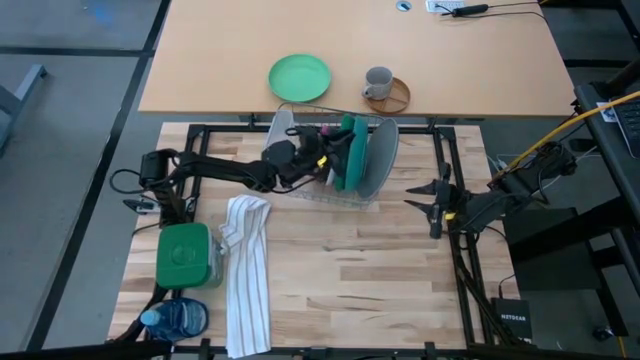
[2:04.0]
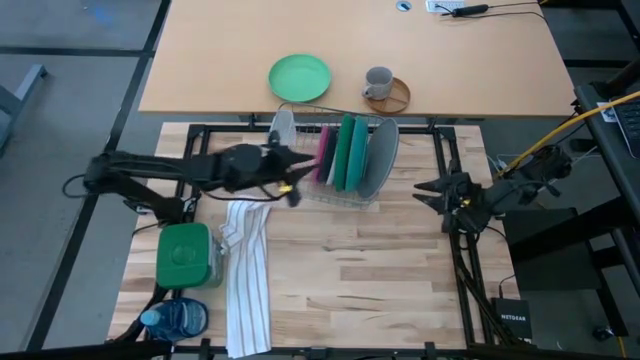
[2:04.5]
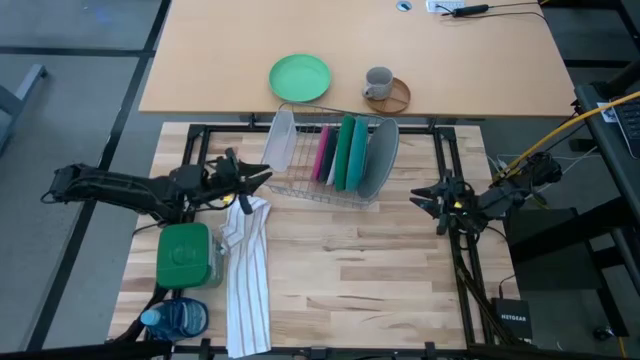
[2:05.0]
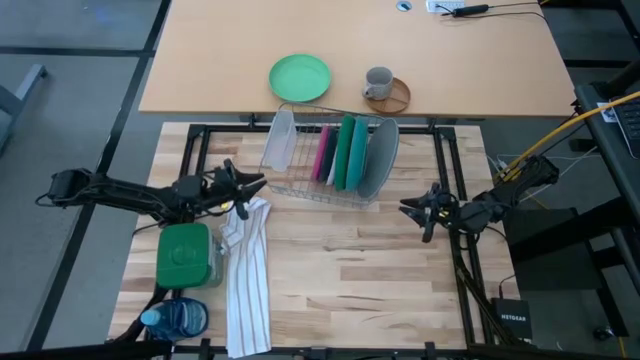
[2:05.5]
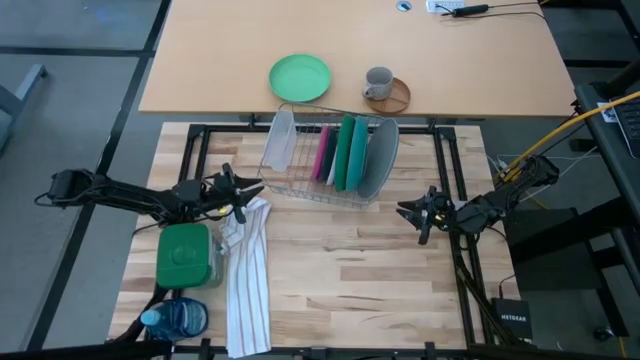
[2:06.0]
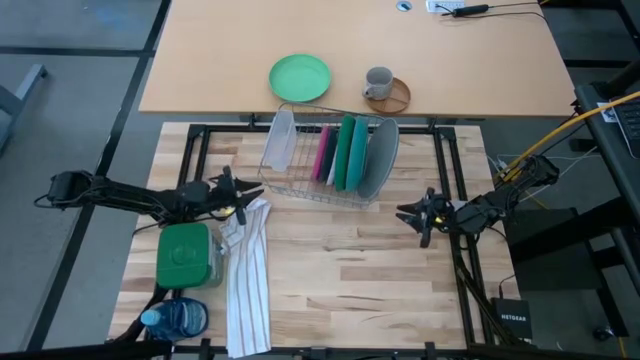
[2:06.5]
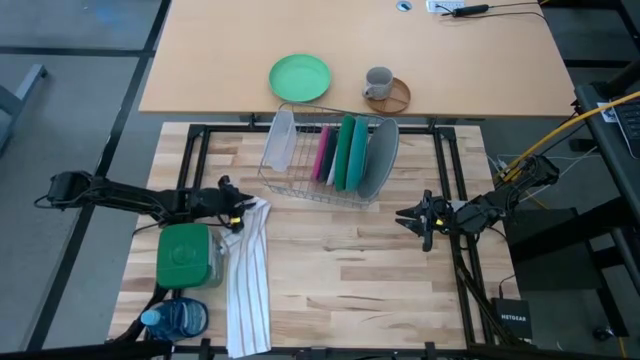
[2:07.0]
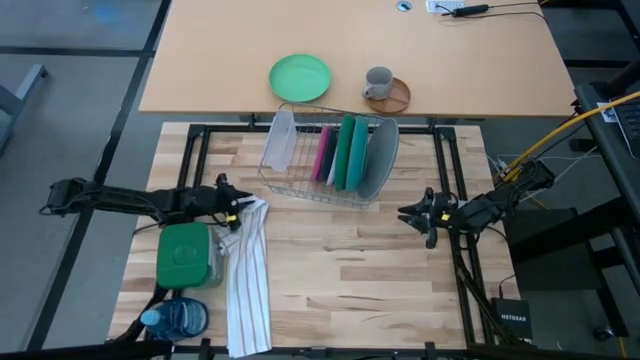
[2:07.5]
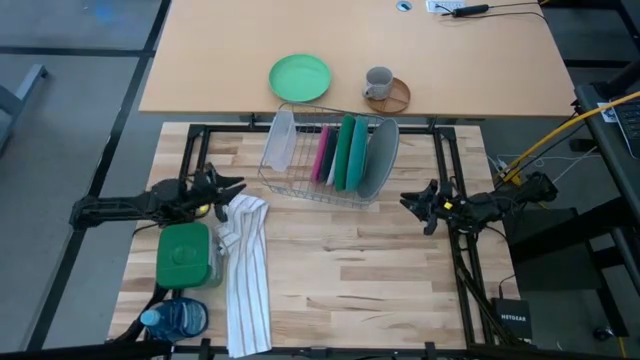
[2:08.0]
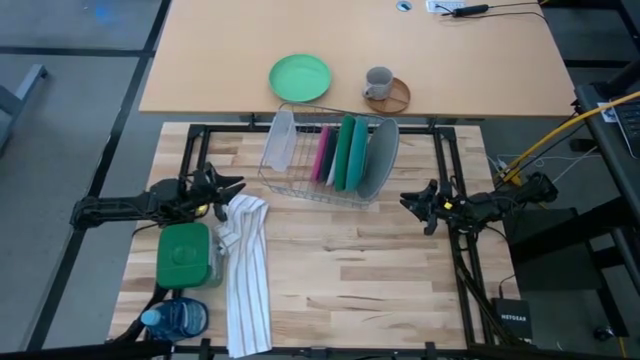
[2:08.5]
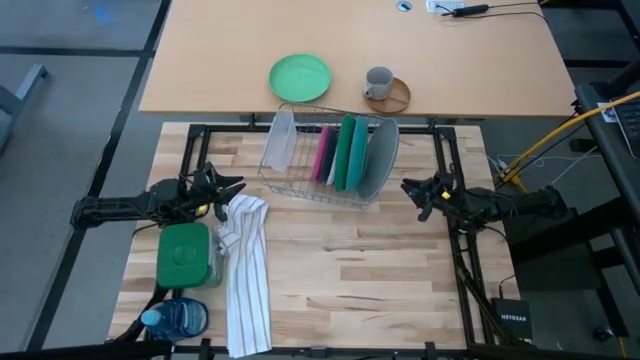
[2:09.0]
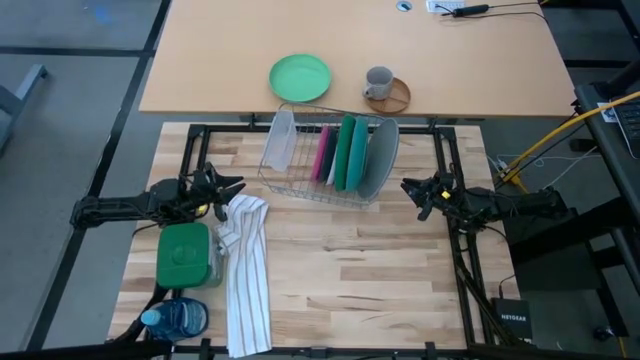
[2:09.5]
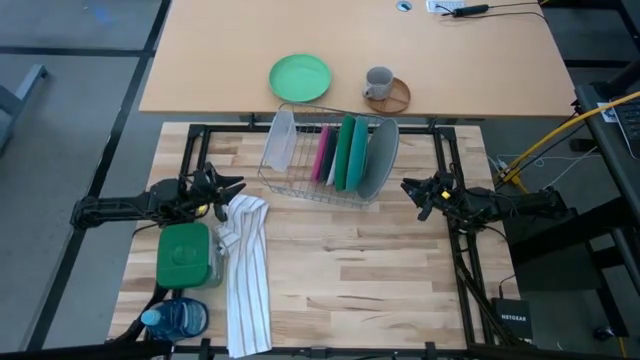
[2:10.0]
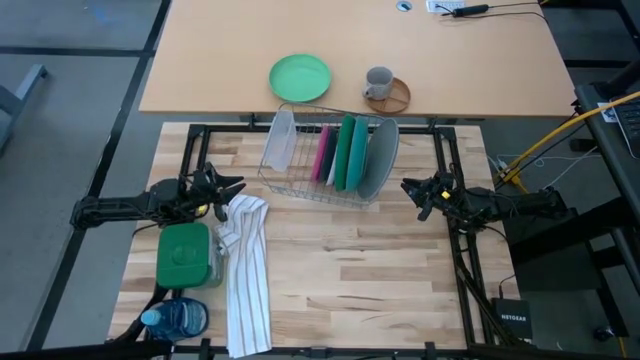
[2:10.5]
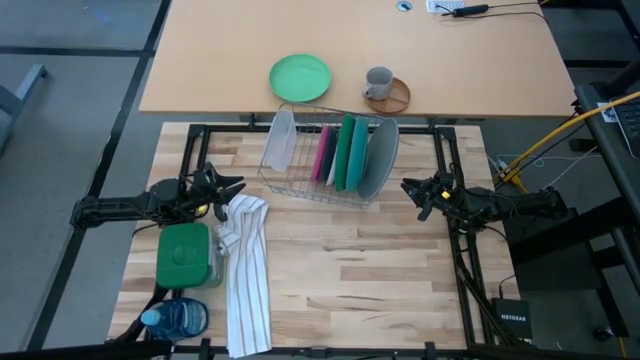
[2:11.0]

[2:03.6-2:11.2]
Task: Sort dishes
Return to Home Position

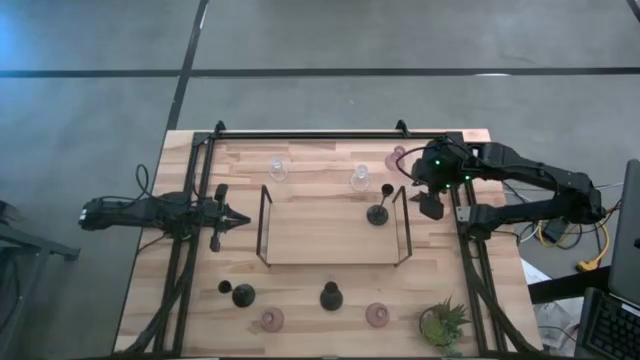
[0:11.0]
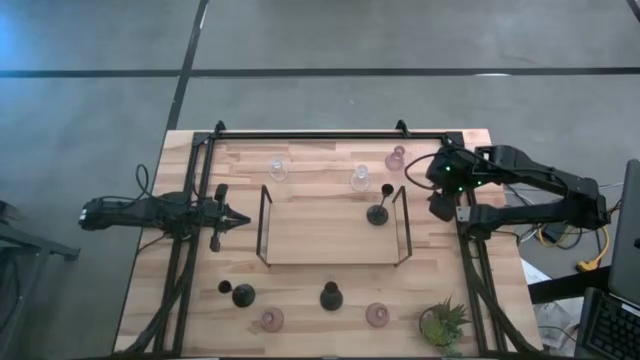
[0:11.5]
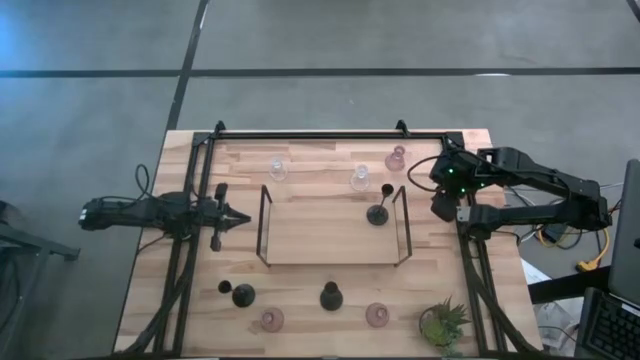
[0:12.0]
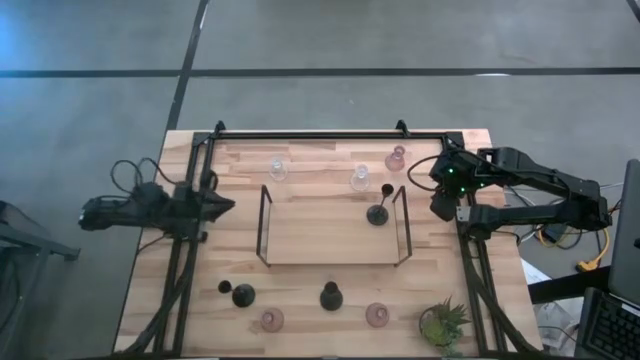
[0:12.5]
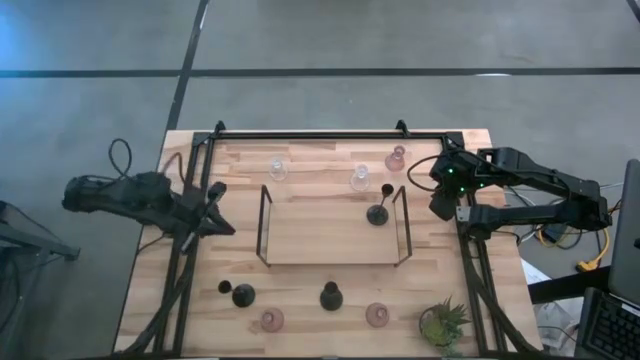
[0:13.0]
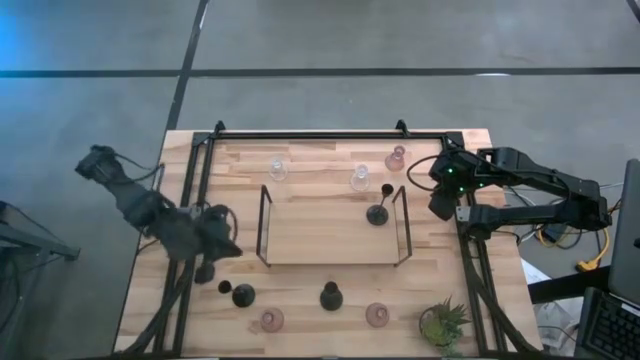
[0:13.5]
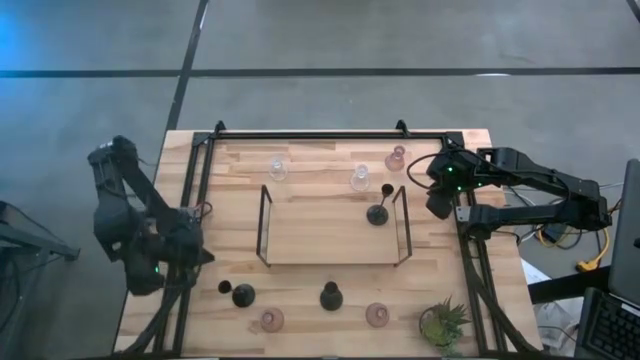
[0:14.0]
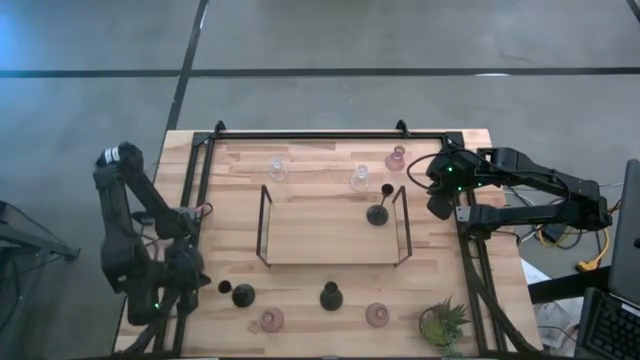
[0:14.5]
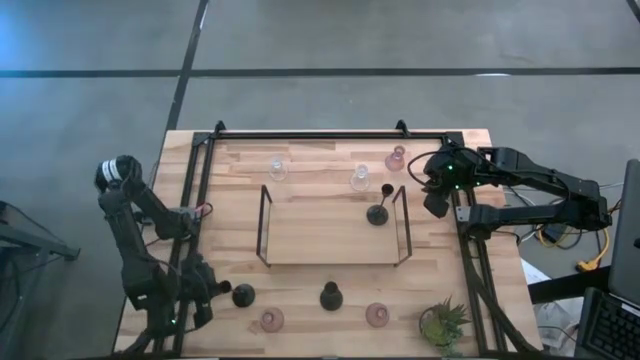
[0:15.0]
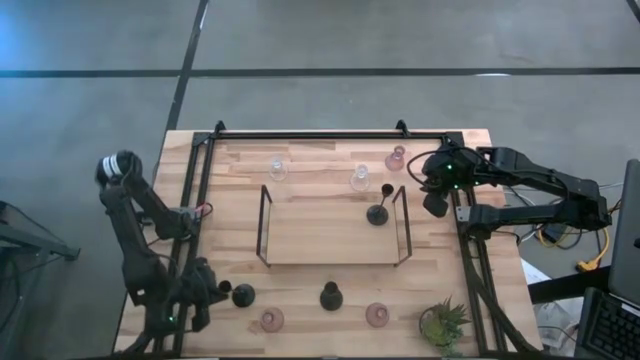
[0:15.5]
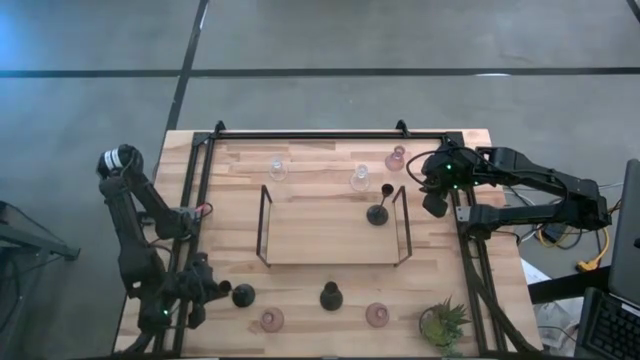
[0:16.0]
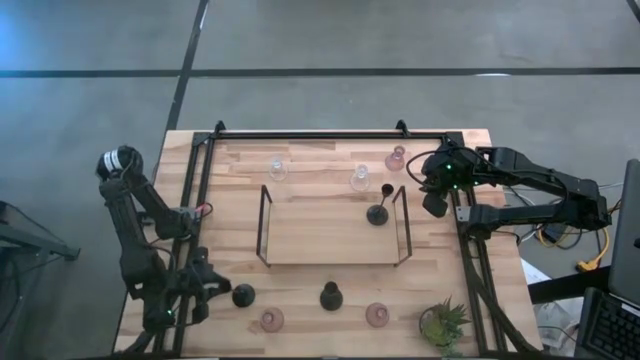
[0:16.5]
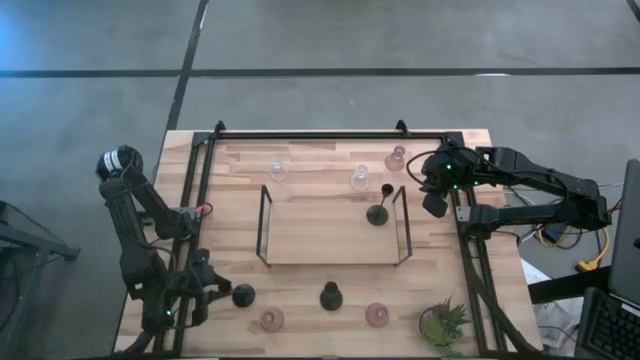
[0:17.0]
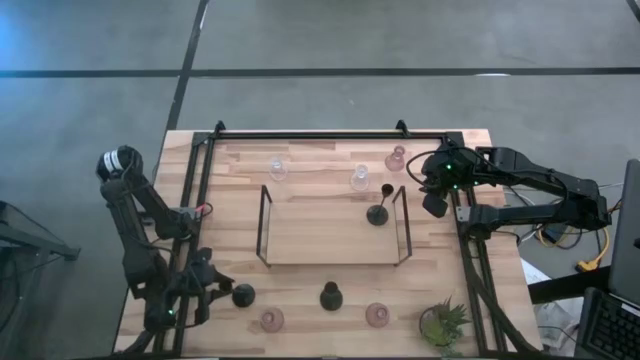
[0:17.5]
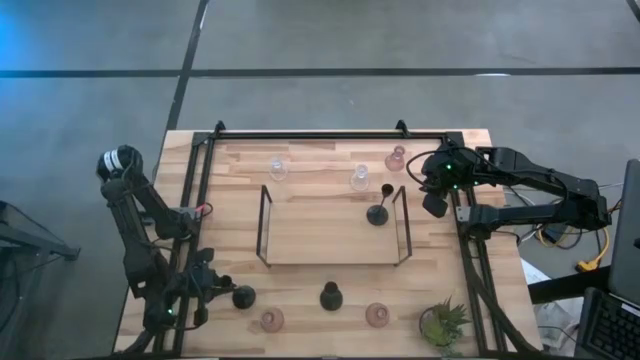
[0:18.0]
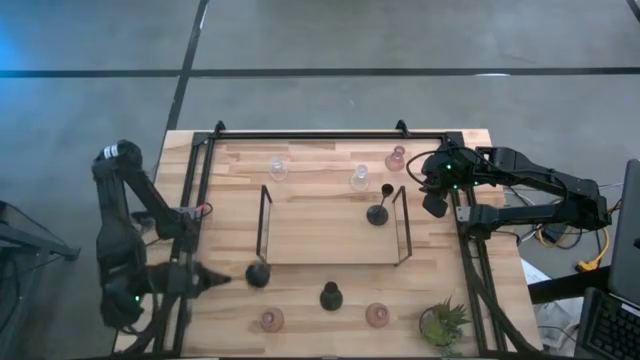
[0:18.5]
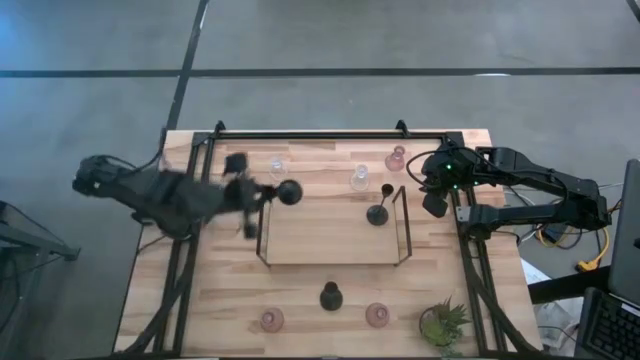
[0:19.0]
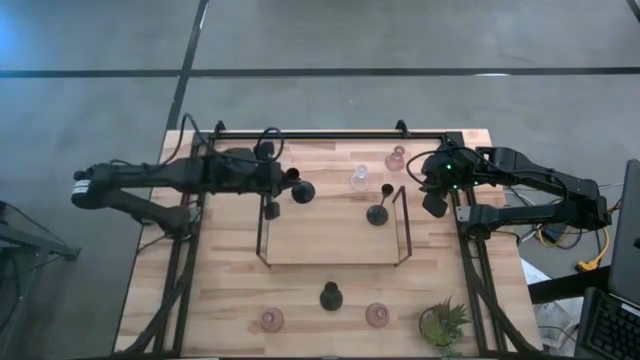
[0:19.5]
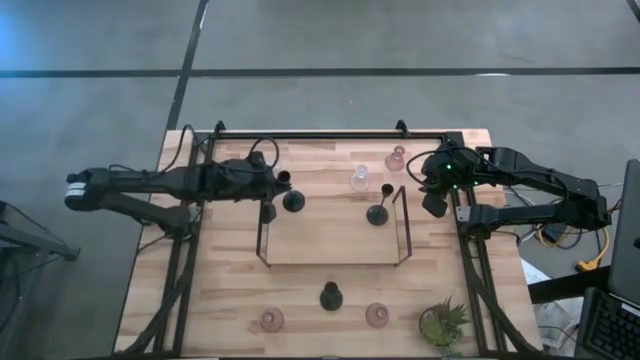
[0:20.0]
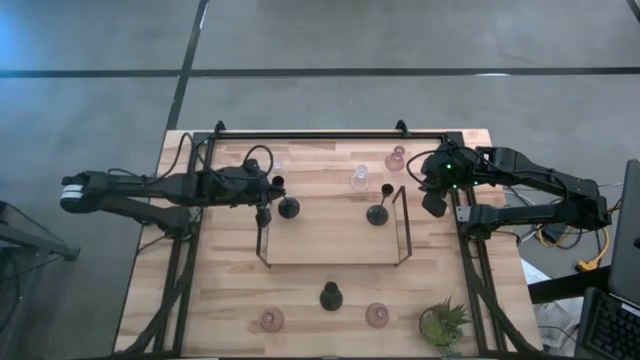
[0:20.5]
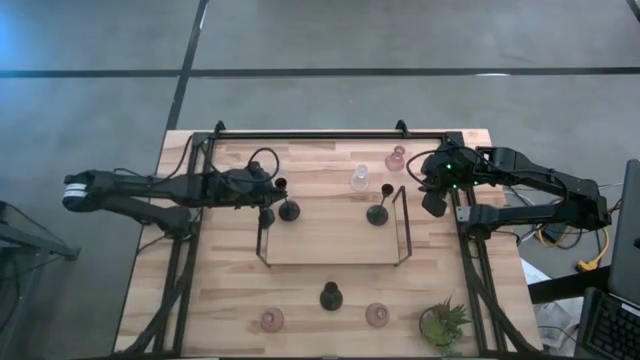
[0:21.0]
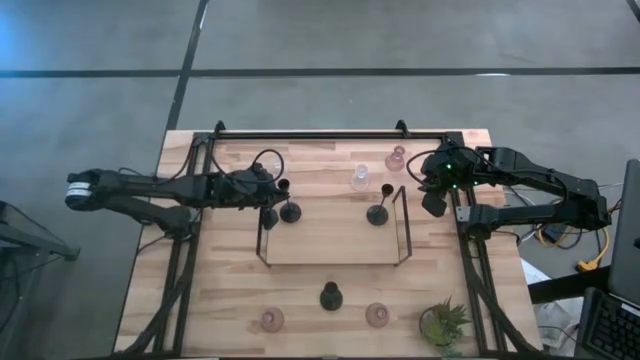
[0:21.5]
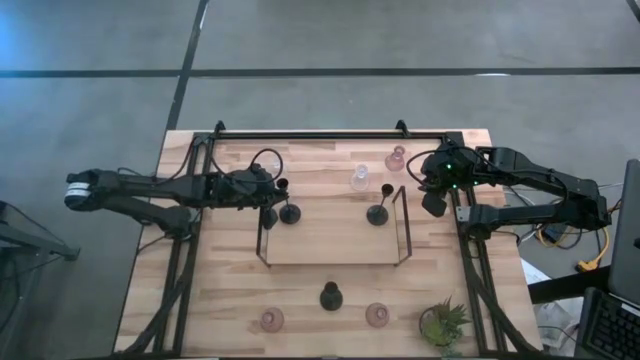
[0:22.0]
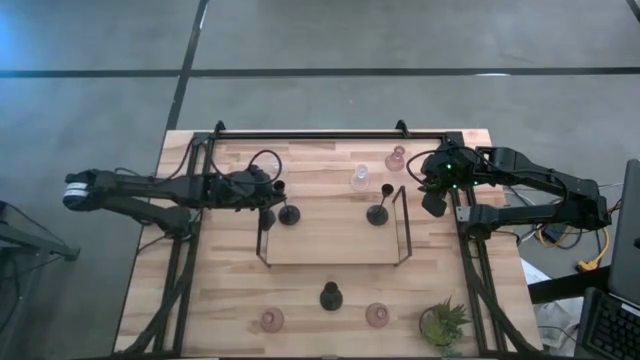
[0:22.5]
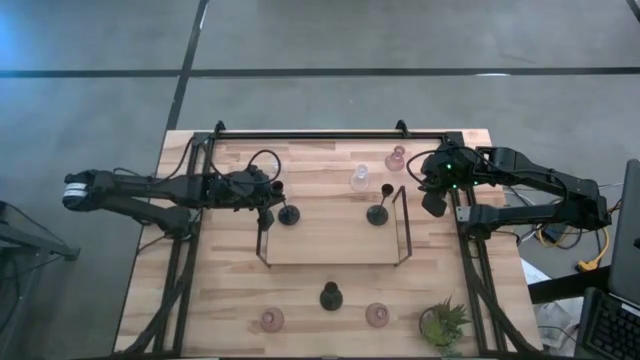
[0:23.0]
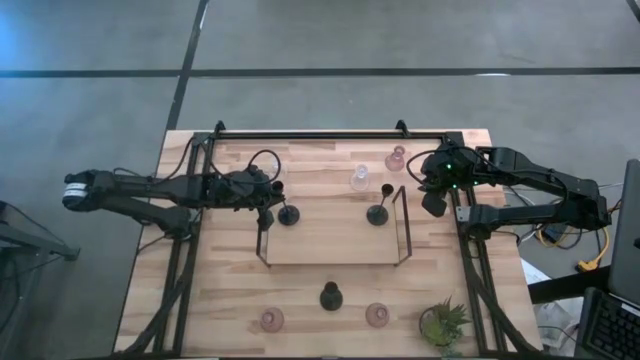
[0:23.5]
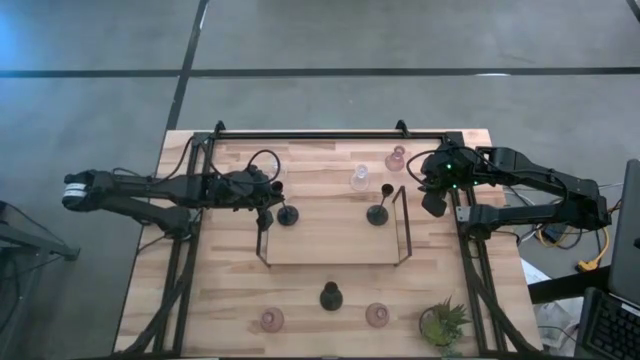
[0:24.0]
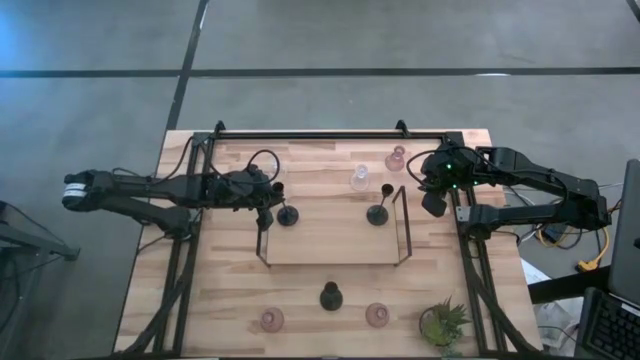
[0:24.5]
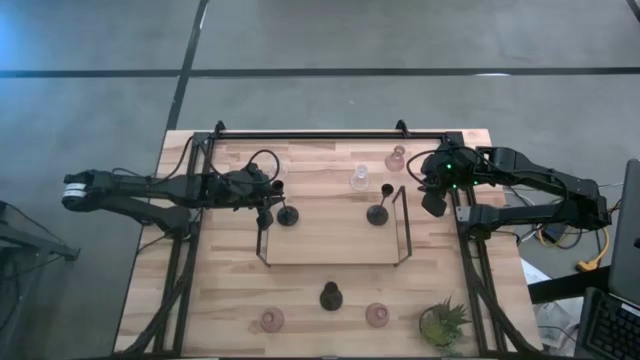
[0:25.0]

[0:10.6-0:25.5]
Task: Pick & Place candle stick holders
Put the left black candle holder on the shelf
